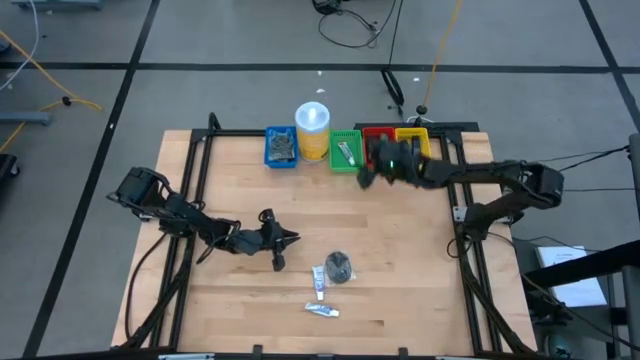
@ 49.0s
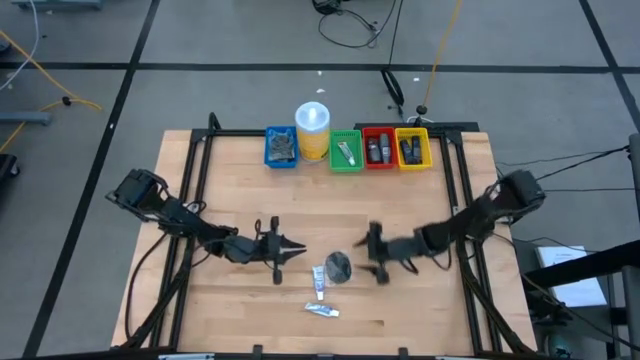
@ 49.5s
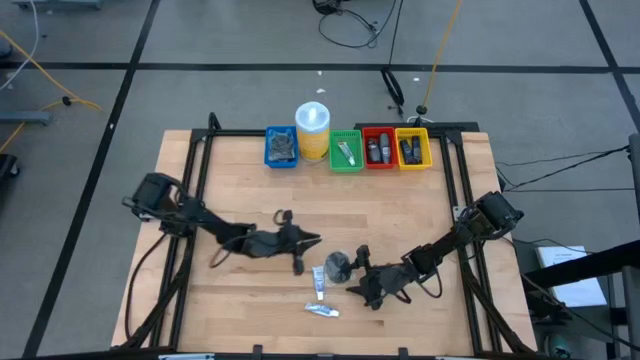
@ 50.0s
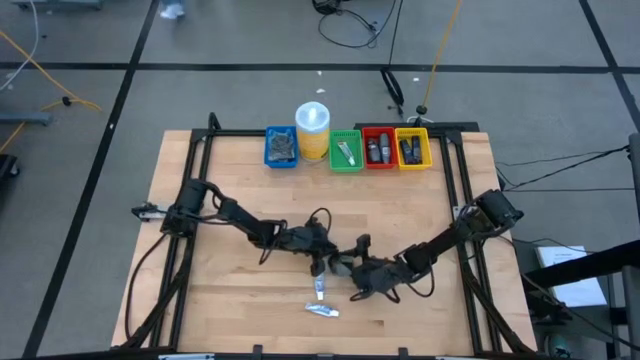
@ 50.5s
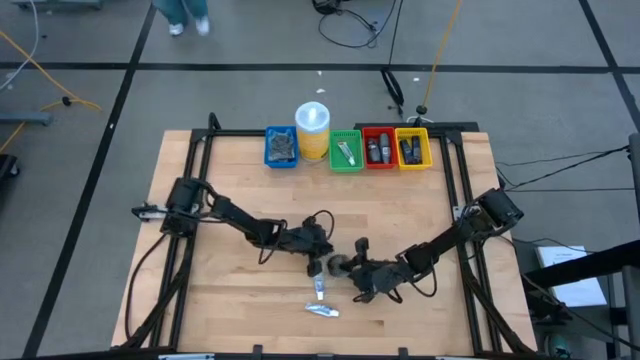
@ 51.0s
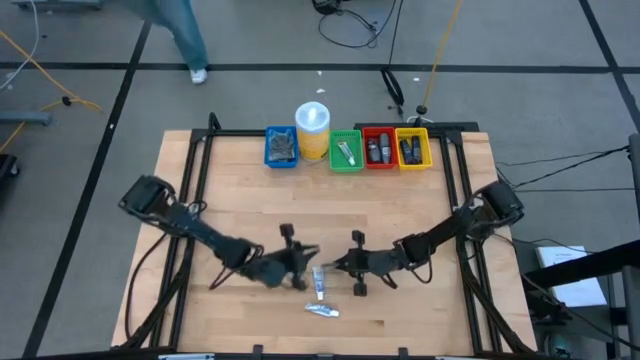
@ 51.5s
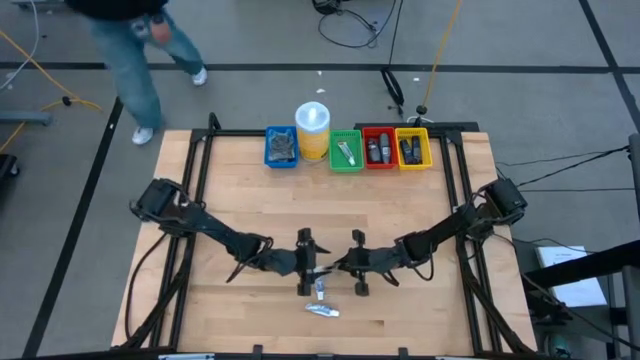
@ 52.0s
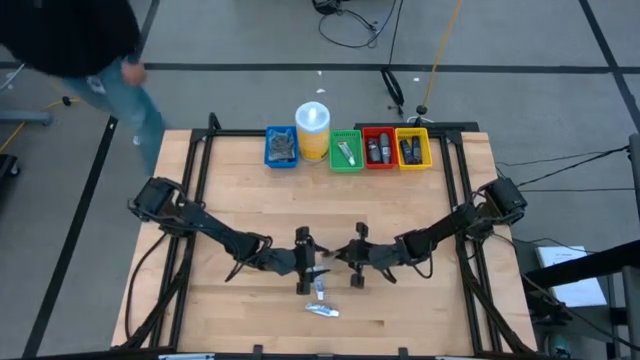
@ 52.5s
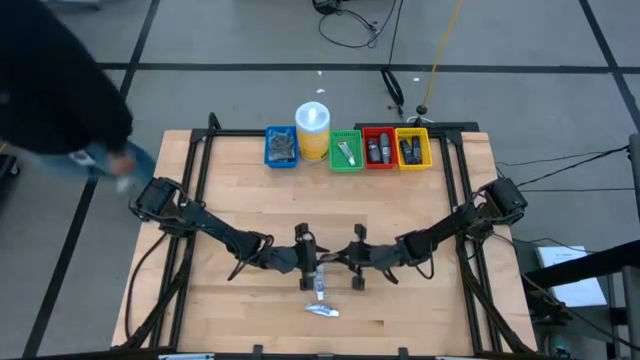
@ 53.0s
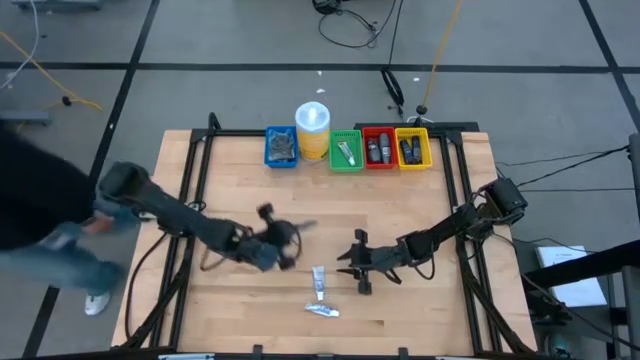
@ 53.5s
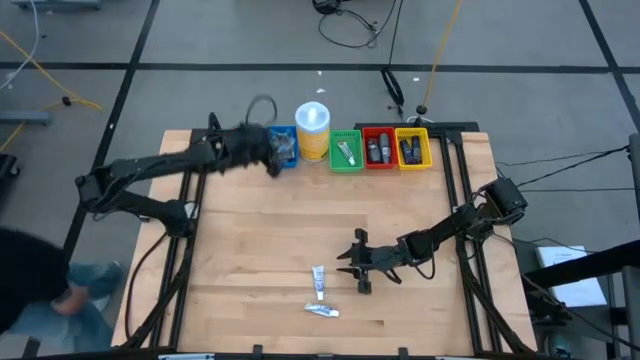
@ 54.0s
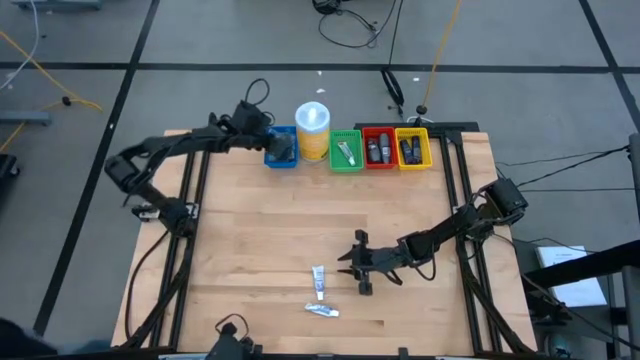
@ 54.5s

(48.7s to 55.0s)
Task: Pick & Place Travel size toiletries
Put the hairbrush into the blue basket

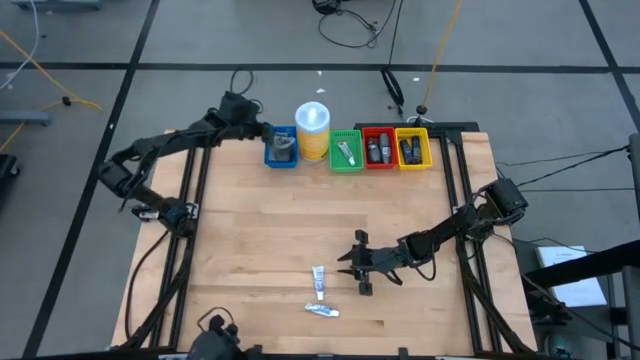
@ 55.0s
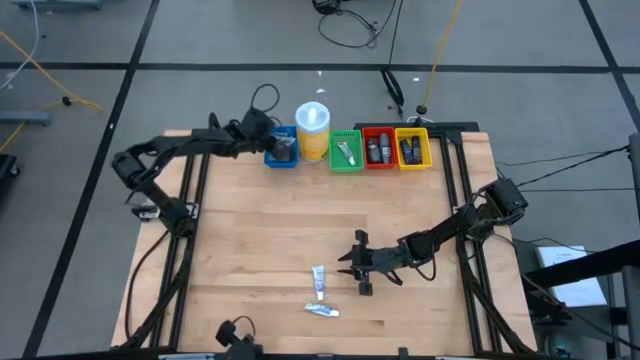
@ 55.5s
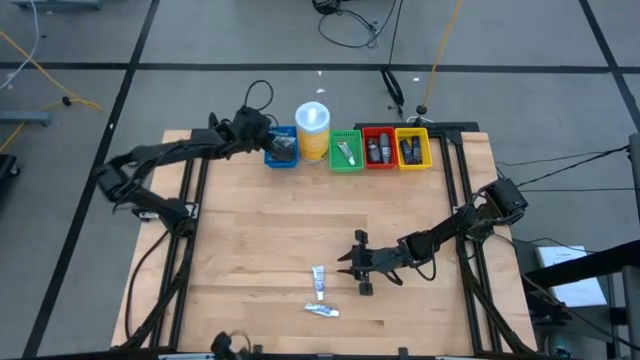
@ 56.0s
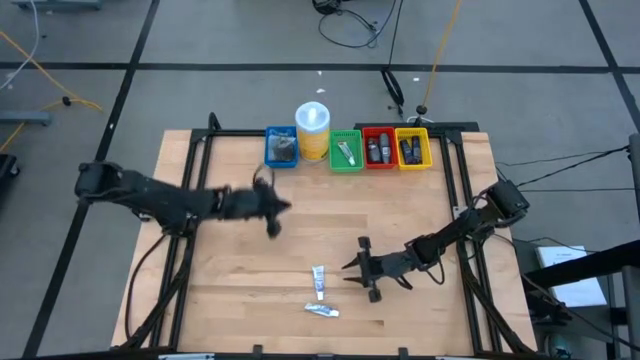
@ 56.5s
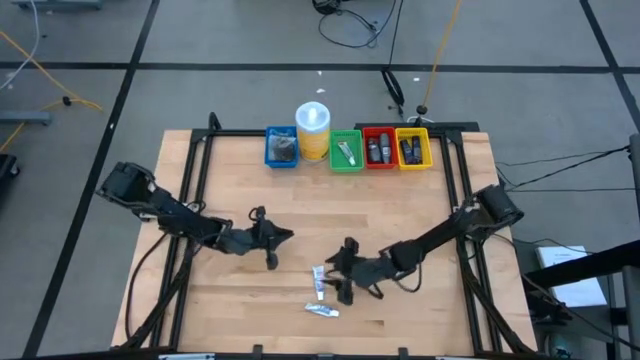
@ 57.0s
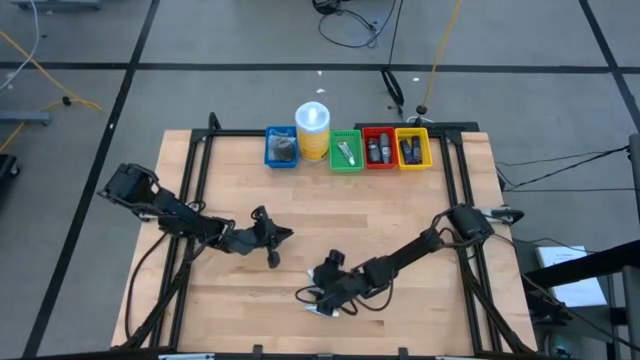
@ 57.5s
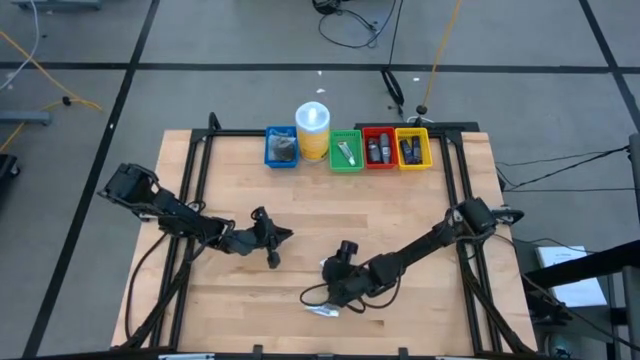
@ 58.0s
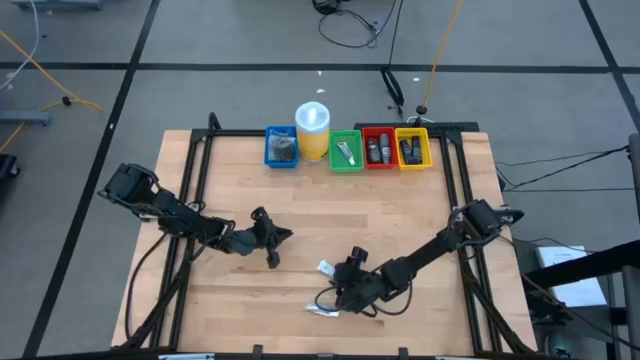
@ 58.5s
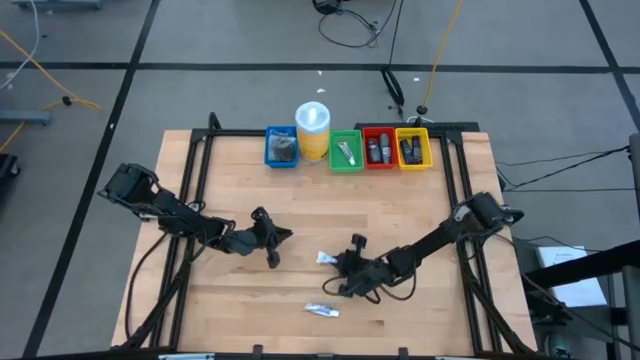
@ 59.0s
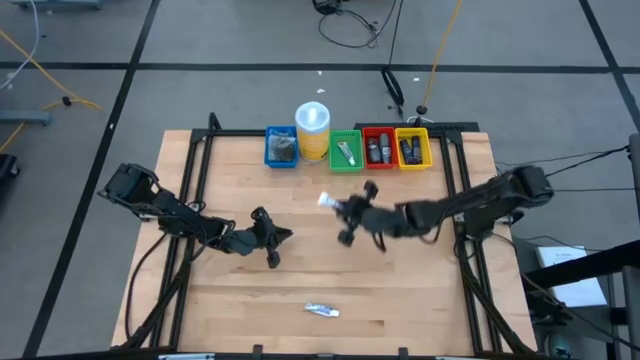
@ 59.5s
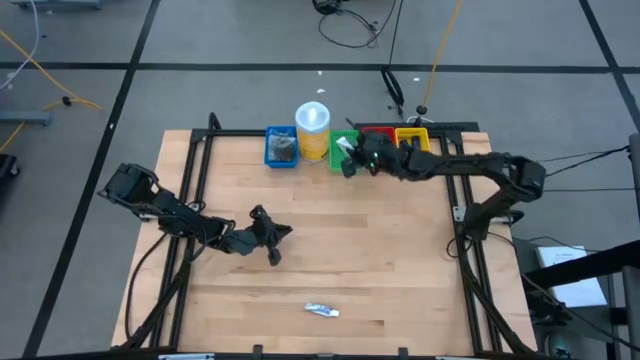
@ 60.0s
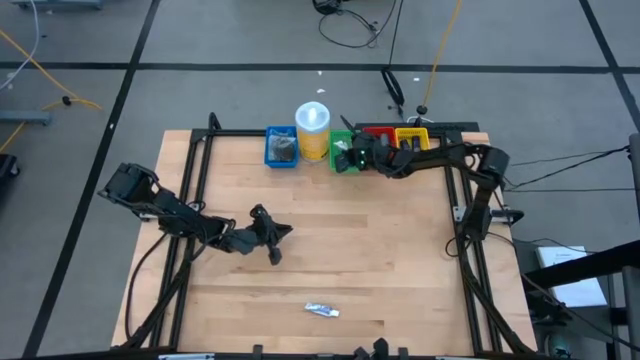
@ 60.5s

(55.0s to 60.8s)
Put the toothpaste into the green basket

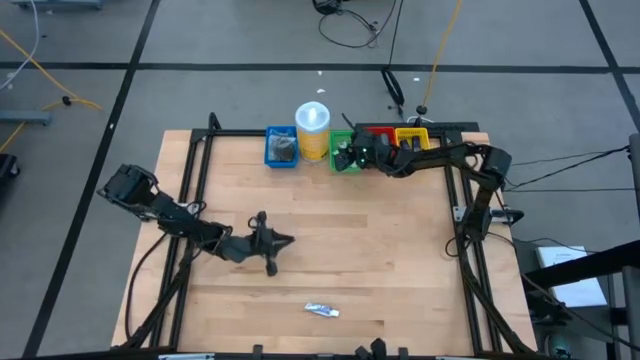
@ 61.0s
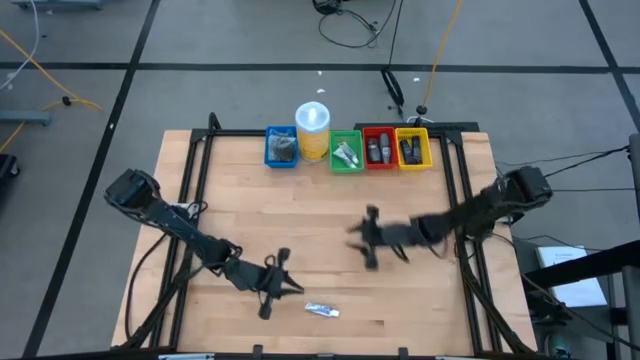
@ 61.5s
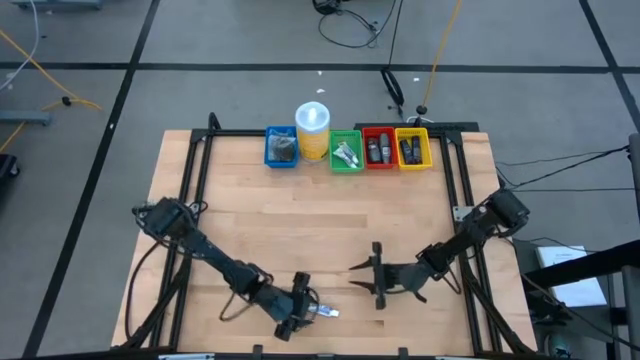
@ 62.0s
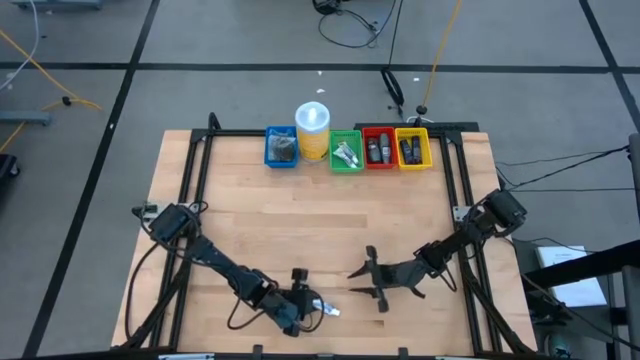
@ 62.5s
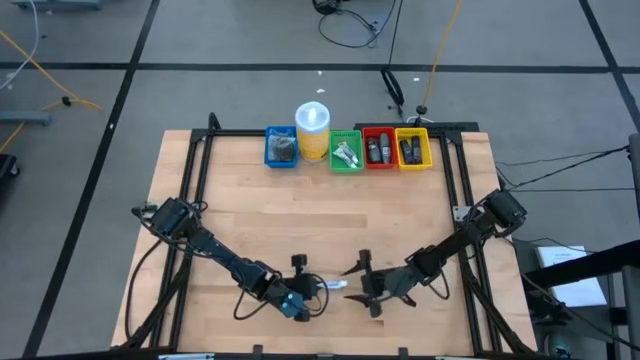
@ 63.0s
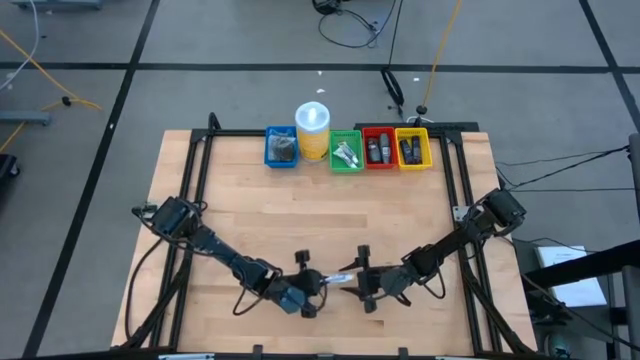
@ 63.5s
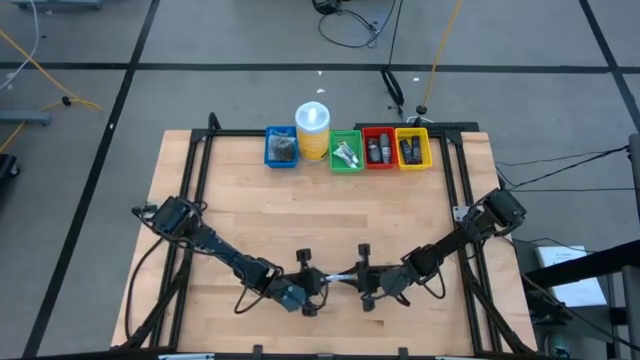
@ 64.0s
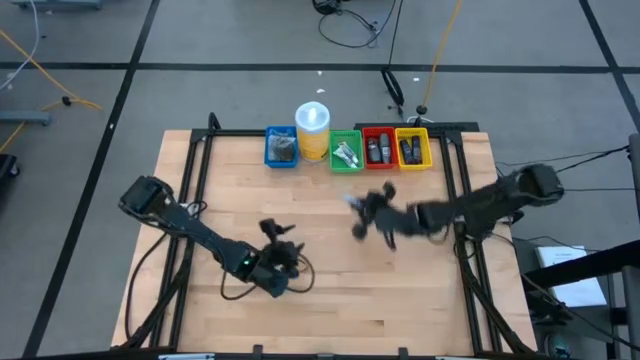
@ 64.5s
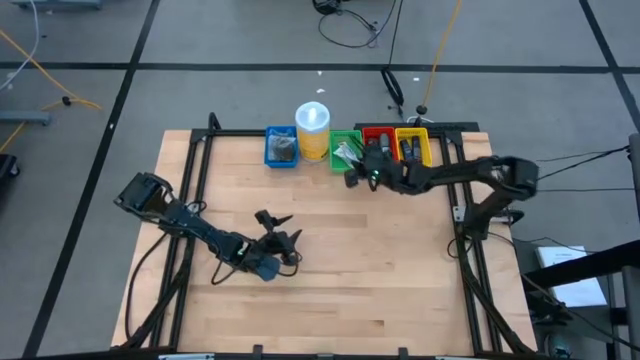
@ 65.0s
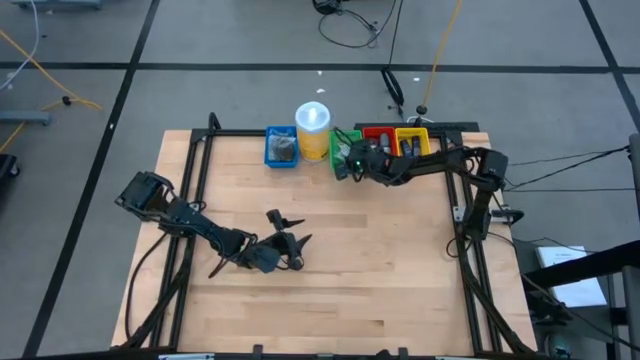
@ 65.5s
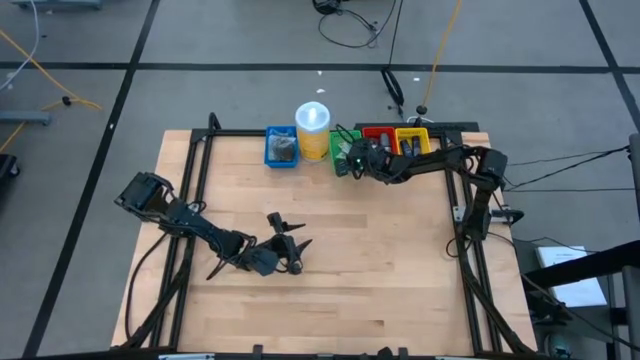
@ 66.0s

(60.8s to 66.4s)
Put the toothpaste into the green basket

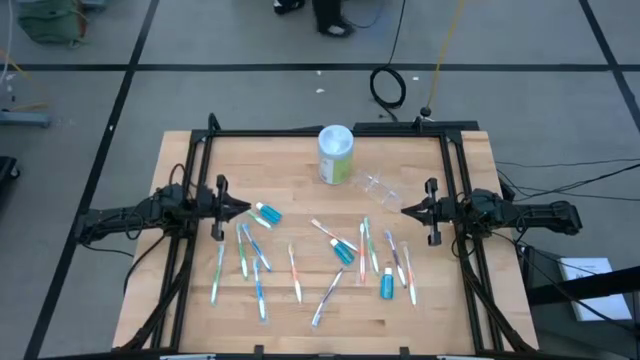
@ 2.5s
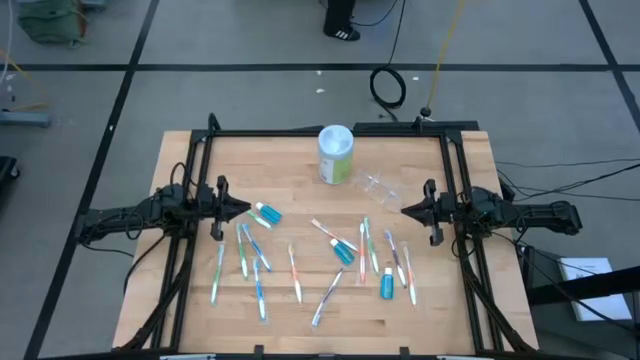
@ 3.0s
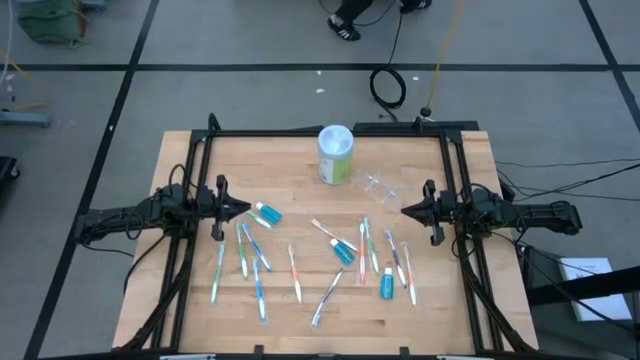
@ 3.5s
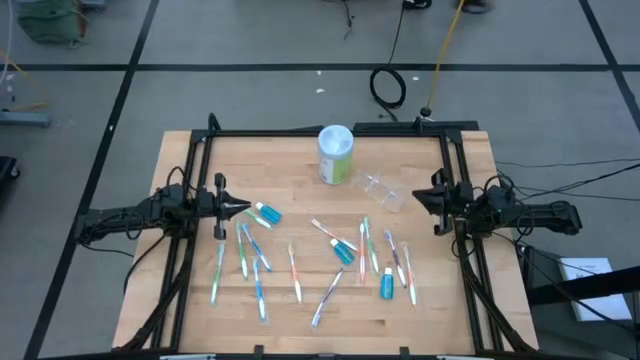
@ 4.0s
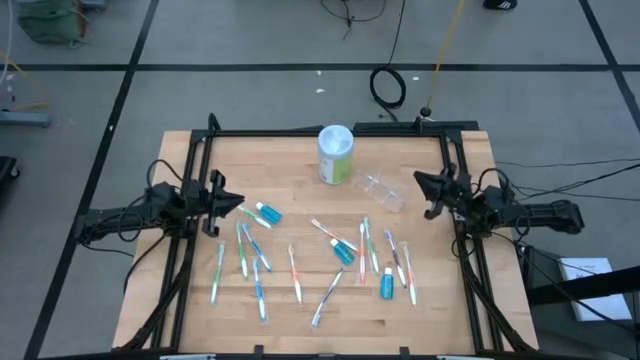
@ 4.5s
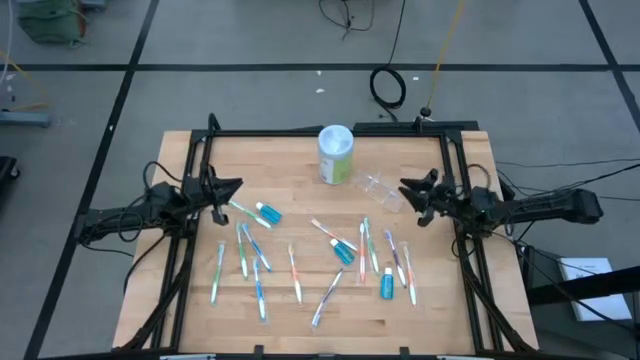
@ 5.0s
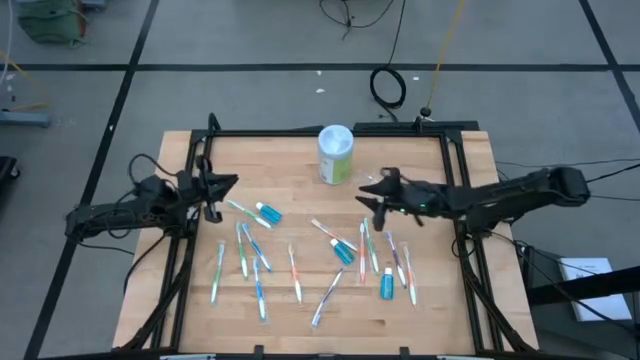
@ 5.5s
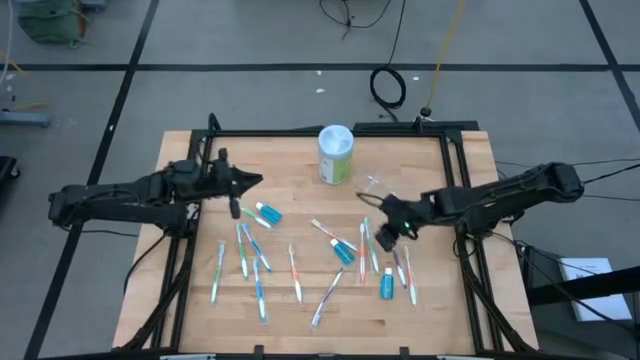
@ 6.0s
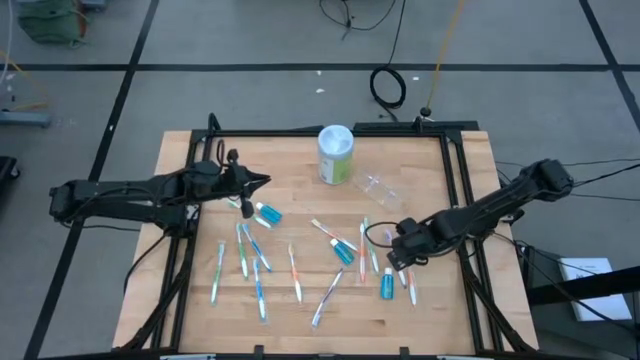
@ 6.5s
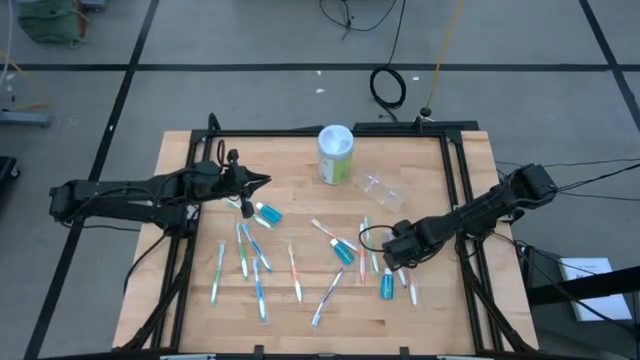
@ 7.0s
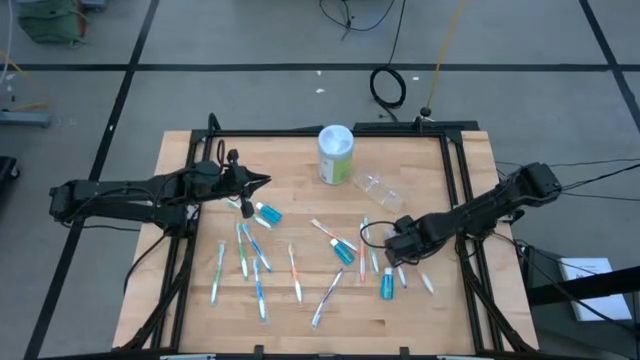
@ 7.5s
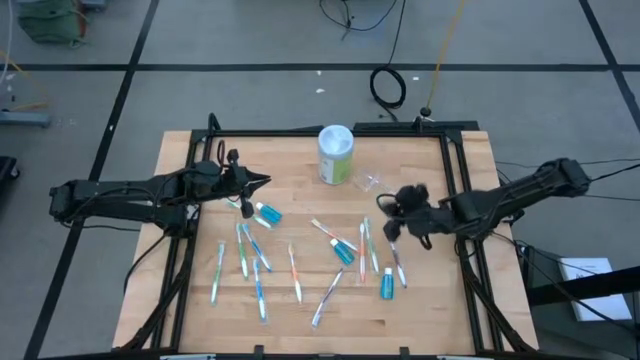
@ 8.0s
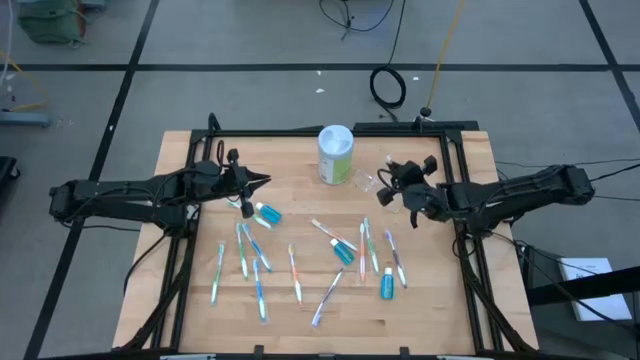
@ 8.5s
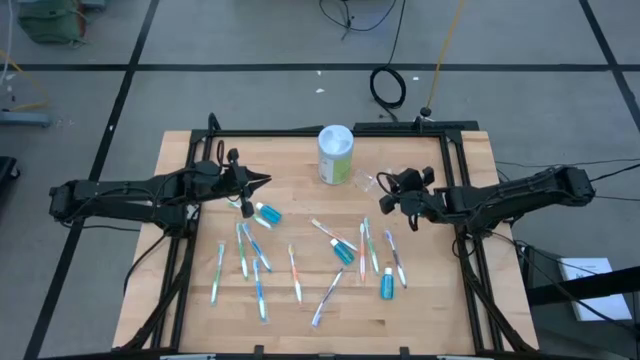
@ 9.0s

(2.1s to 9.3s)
Task: Pick & Place toothbrushing station
Put the orange toothbrush into the transparent organizer
